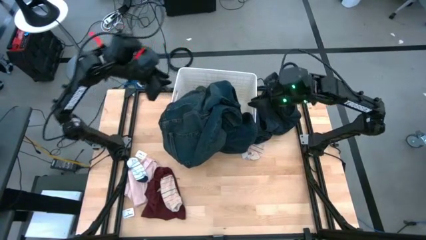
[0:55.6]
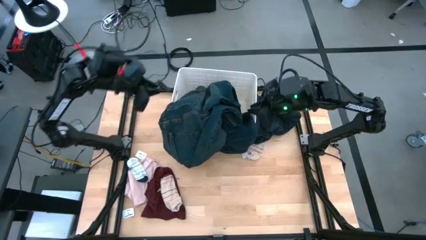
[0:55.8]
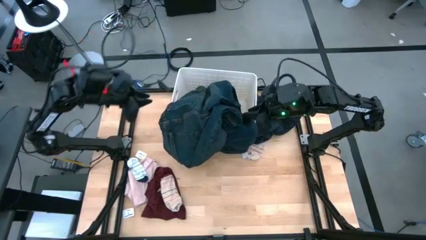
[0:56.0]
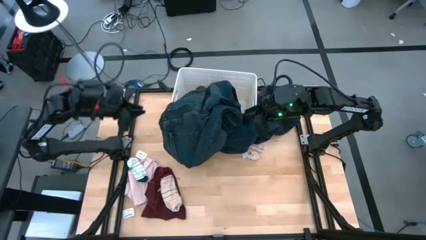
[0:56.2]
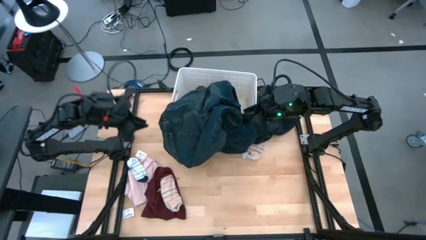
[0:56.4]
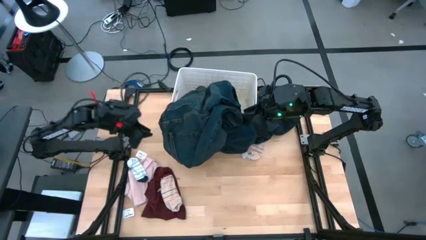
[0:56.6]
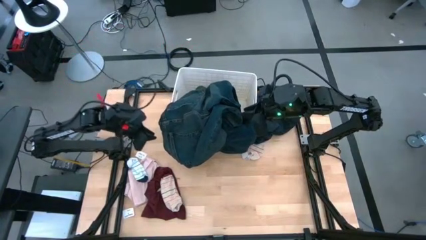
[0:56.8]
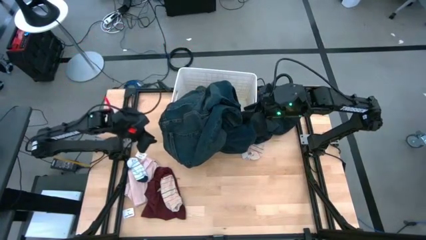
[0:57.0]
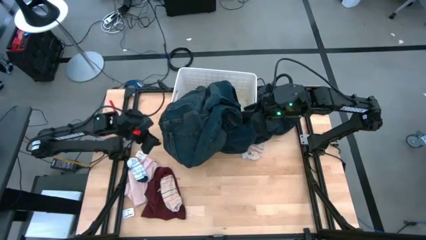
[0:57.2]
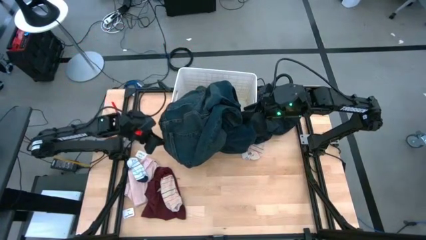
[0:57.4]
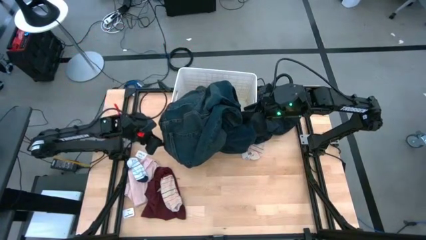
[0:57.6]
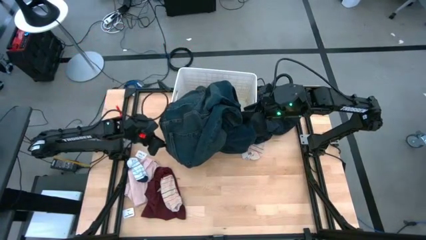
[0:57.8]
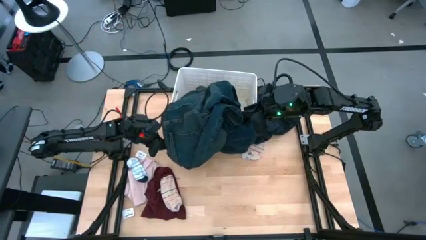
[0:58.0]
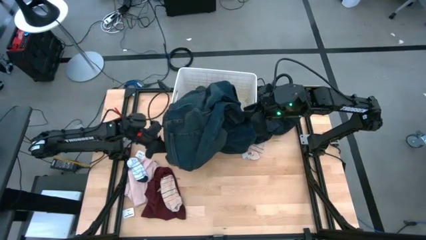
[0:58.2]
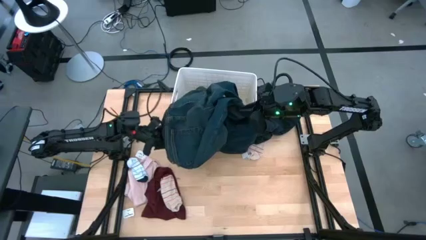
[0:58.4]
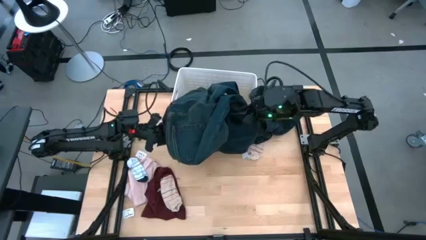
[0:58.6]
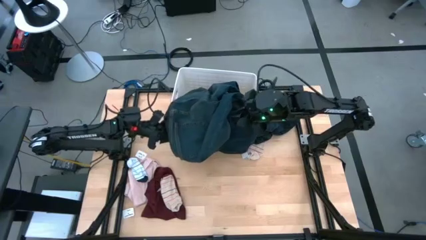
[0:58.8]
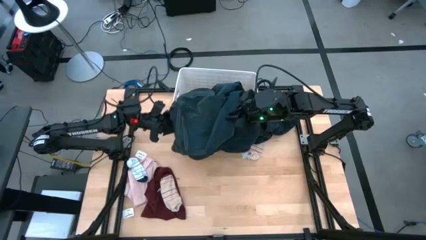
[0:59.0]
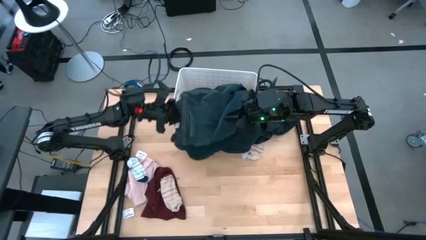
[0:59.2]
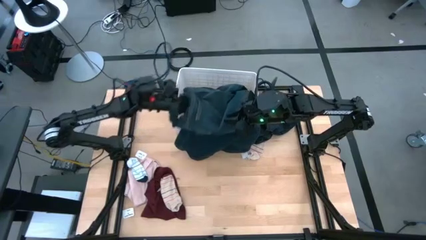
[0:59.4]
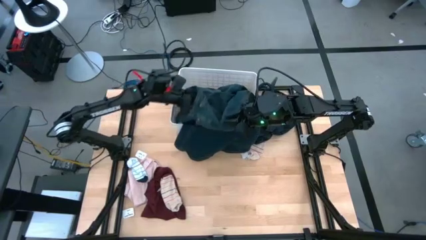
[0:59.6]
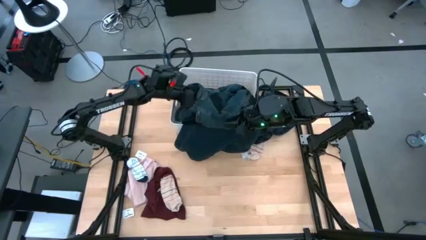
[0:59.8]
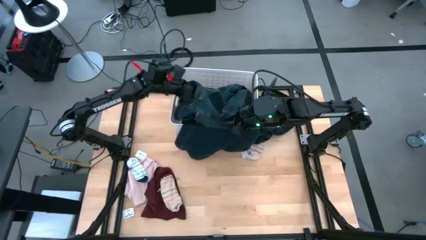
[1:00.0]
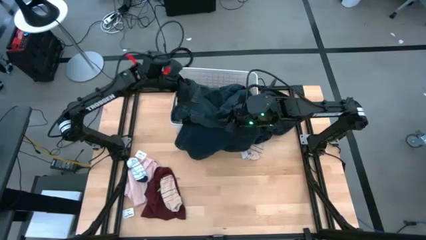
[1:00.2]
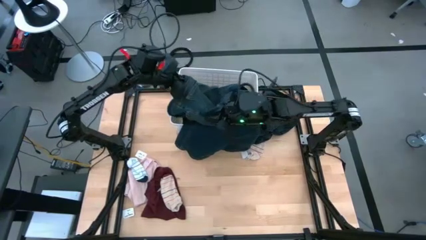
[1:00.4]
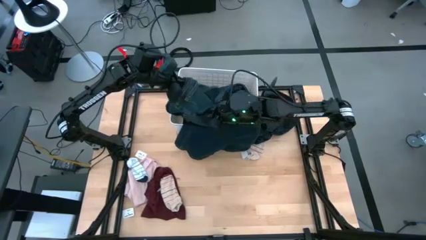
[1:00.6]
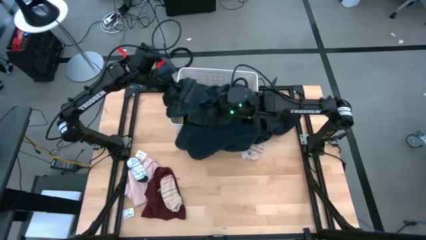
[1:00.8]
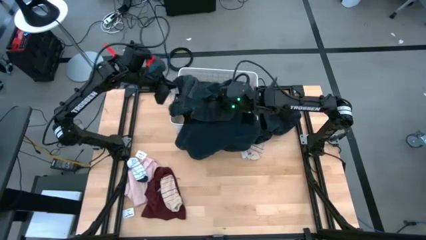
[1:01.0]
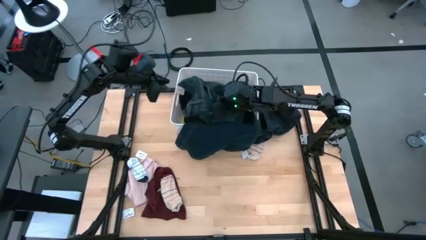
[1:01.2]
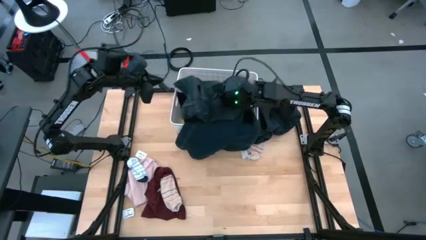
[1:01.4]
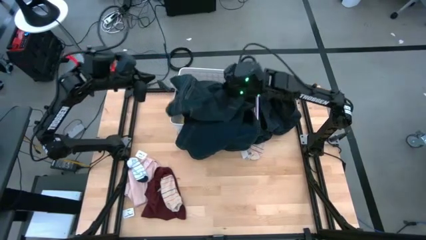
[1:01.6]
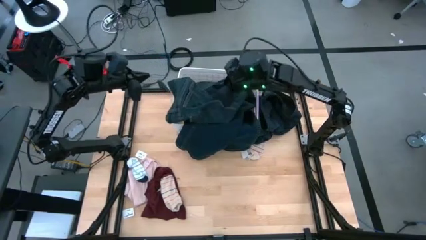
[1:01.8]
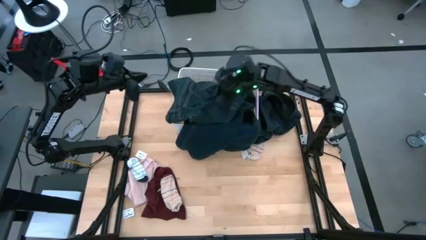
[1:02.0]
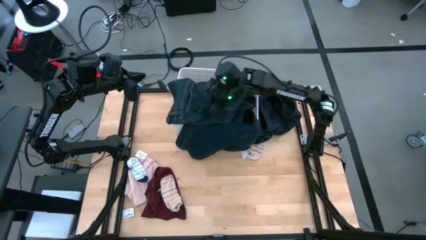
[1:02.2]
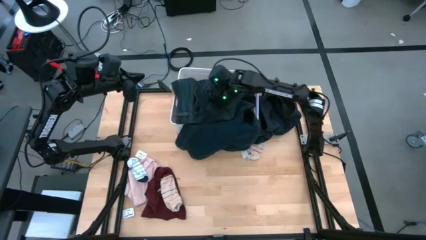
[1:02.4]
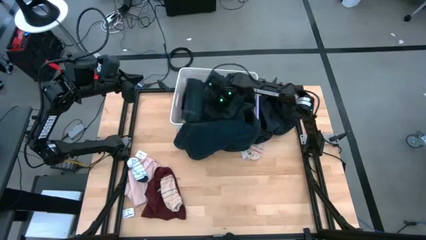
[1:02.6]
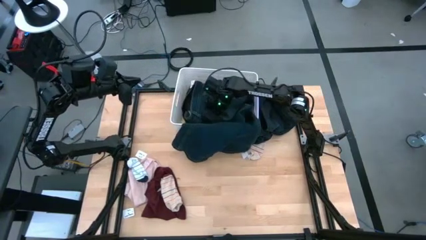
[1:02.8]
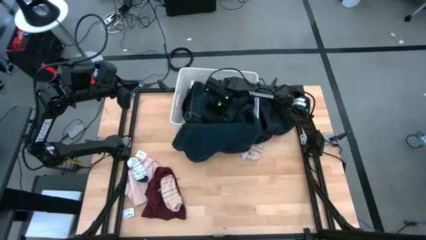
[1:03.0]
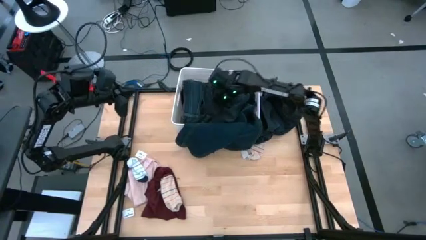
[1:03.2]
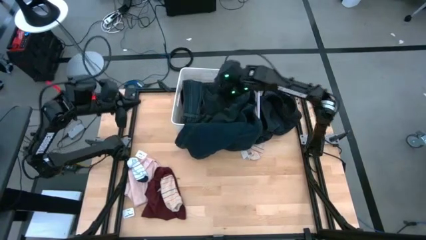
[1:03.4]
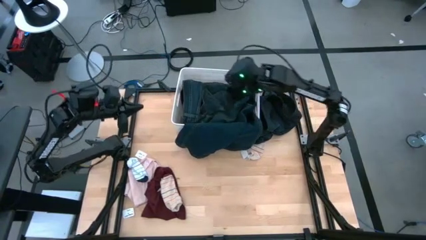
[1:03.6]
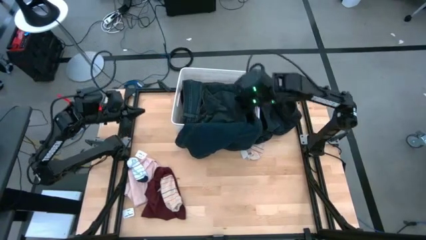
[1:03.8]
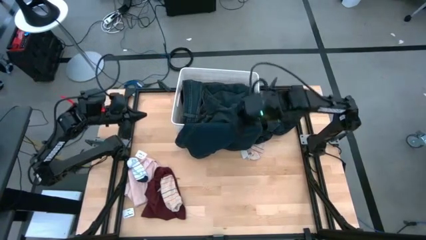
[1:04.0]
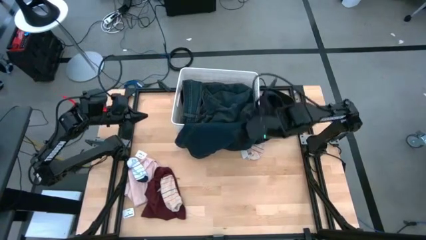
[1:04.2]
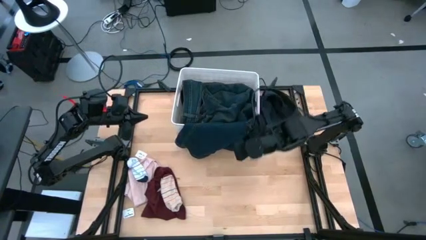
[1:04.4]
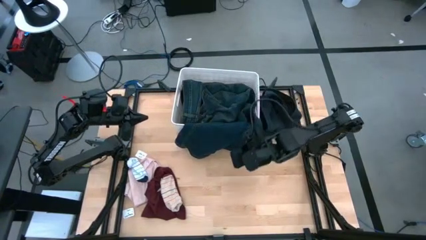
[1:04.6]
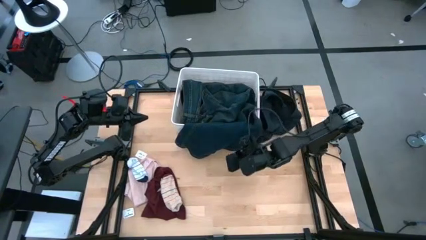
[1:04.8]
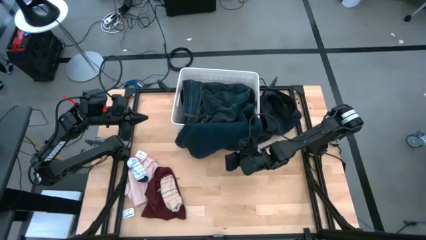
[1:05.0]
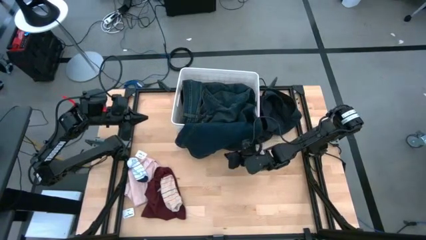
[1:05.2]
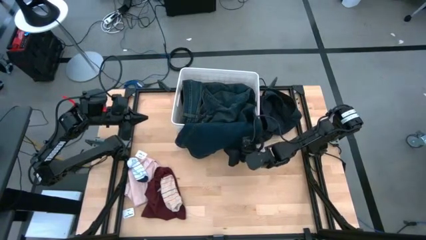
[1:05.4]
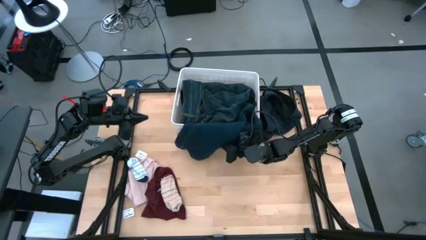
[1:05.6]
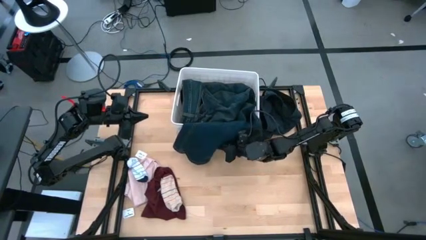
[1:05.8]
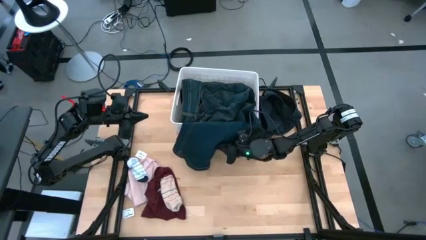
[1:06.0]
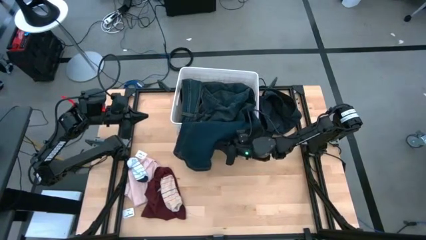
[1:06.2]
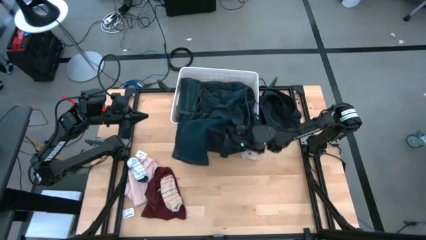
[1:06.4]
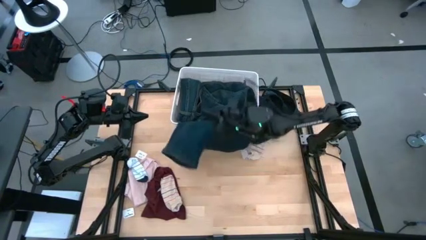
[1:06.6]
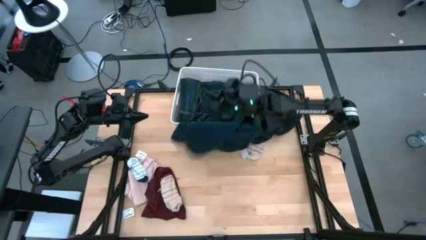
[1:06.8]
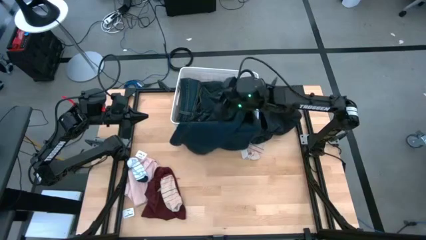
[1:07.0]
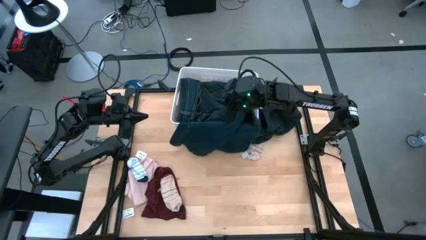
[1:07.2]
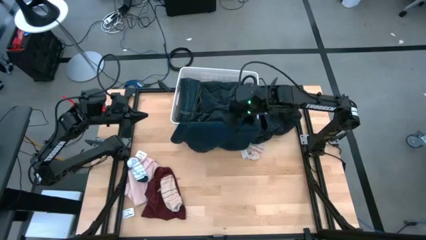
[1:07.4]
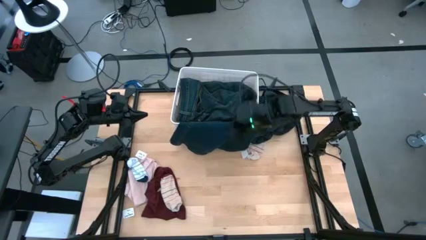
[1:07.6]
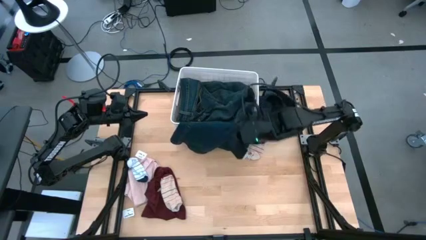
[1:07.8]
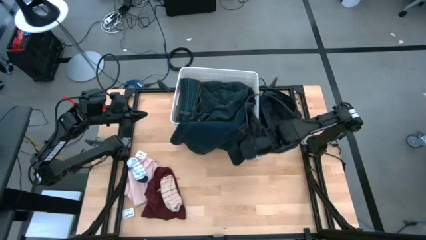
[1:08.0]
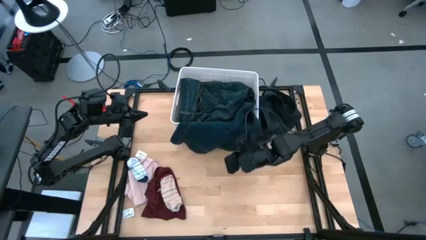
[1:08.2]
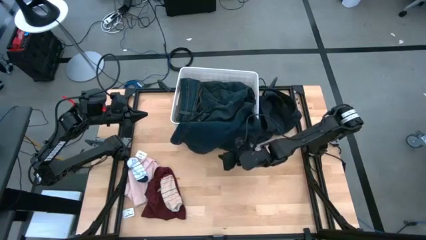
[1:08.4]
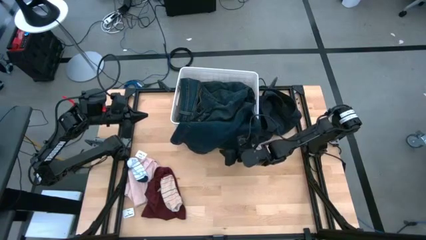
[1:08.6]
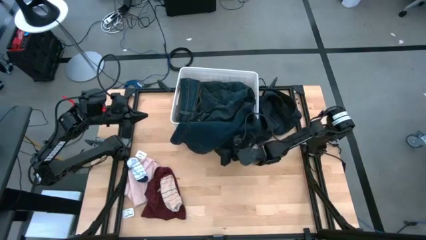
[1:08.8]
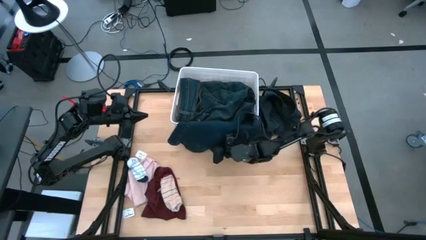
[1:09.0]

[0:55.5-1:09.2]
Task: Sort clothes
Put the dark blue pants into the white laundry bin

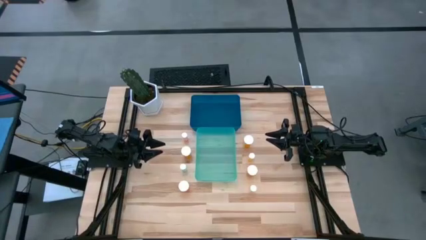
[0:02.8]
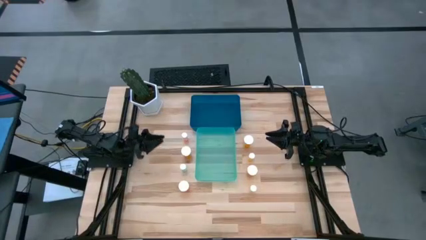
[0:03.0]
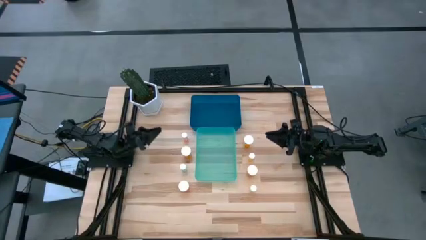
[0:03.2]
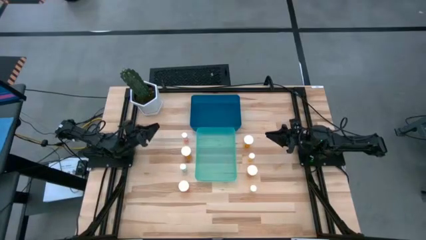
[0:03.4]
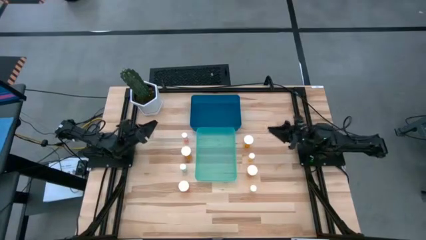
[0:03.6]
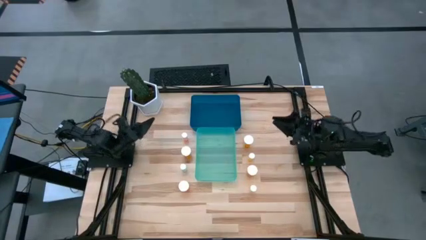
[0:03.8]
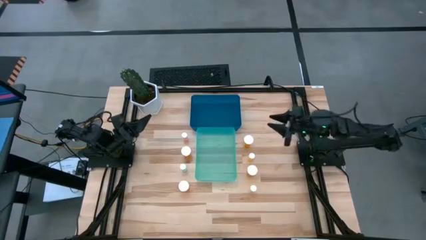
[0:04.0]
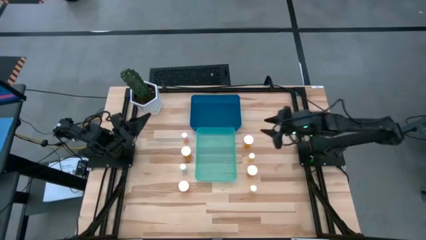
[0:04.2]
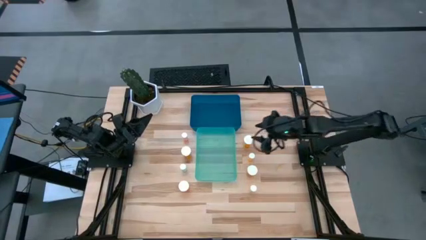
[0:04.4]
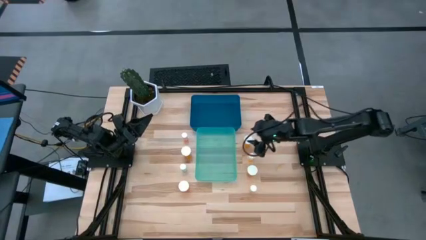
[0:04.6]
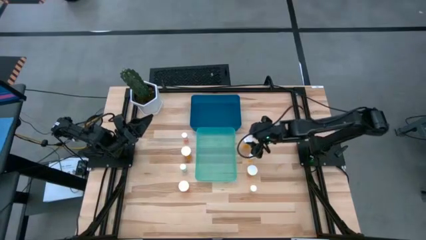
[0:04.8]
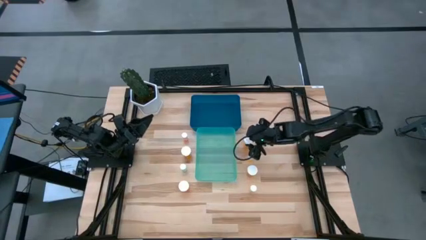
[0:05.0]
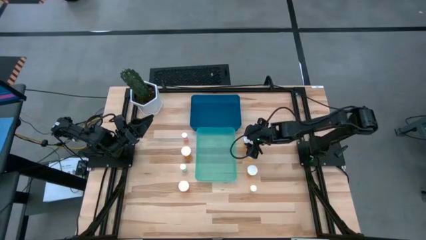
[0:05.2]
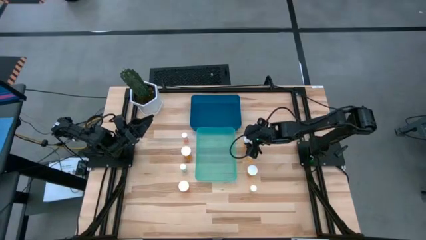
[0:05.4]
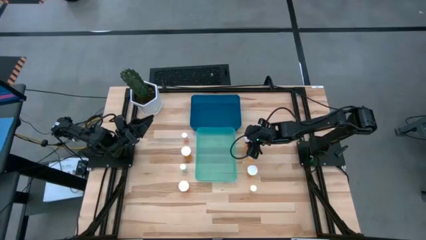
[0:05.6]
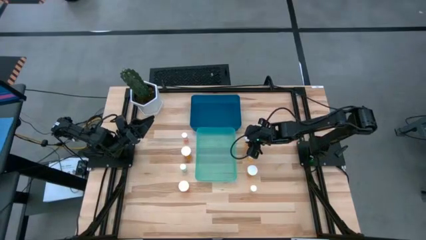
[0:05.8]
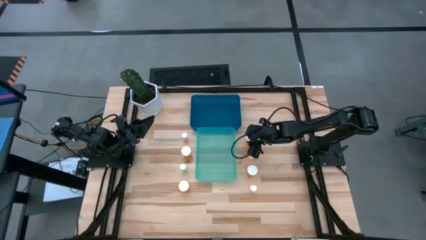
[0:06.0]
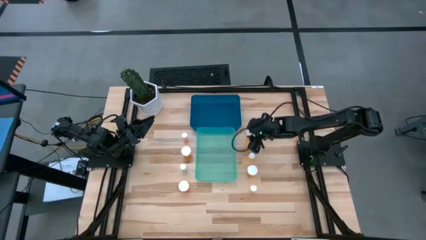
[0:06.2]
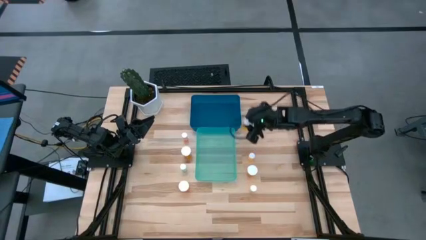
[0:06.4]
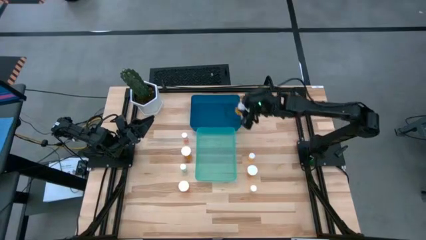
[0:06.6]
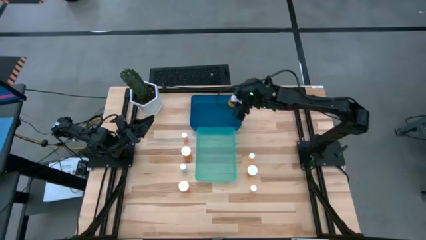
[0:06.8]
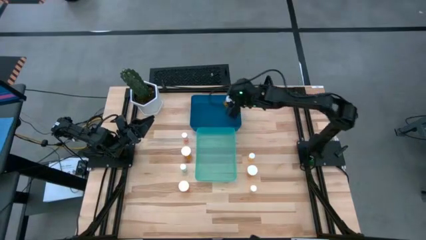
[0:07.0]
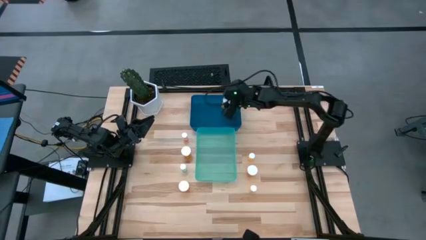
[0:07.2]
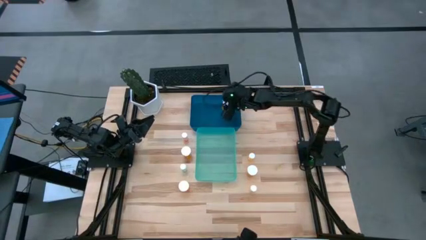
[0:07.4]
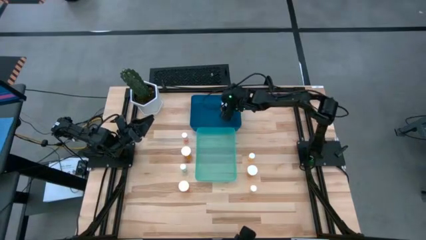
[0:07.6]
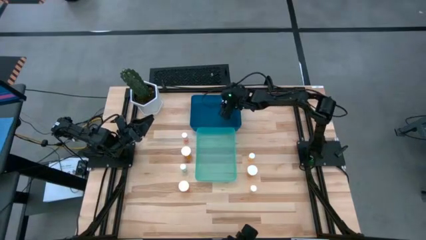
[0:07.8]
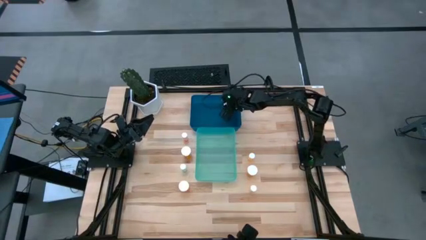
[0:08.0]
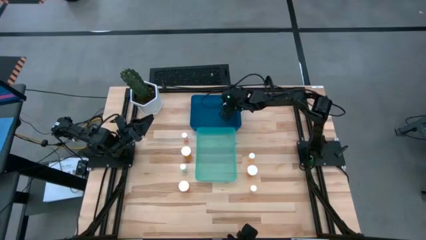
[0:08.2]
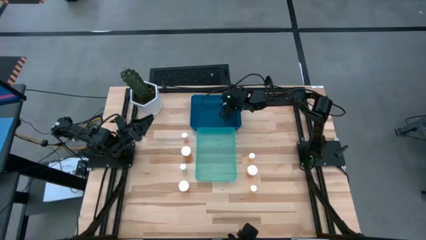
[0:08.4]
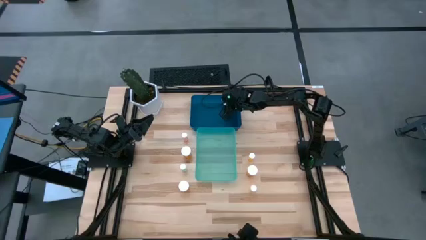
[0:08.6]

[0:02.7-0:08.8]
Task: Pick and place medicine bottles into bin by pill shape (circle, oval)
Put the large orange pill bottle into the blue bin
